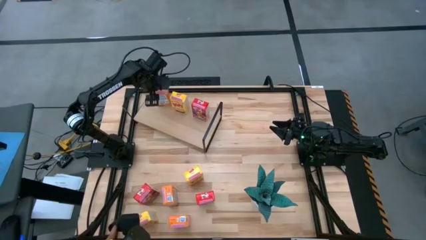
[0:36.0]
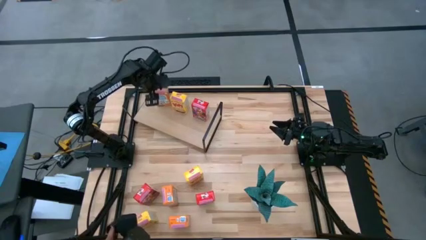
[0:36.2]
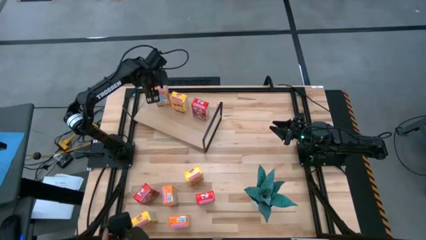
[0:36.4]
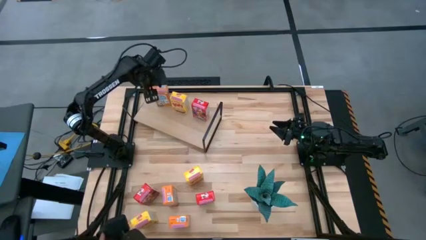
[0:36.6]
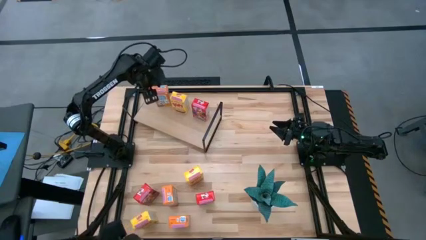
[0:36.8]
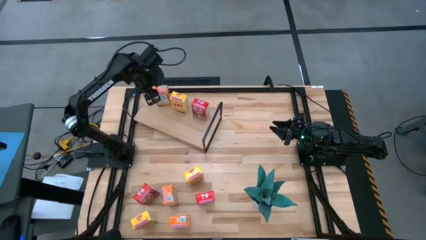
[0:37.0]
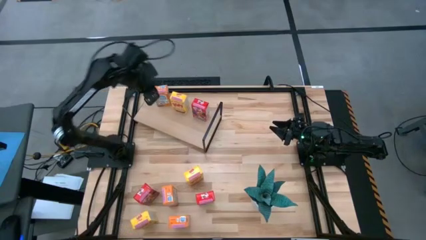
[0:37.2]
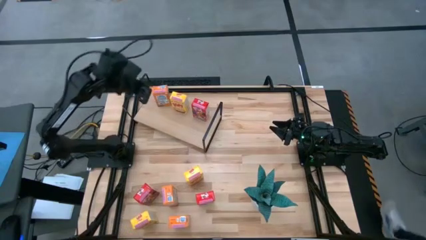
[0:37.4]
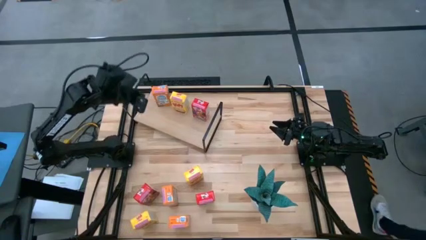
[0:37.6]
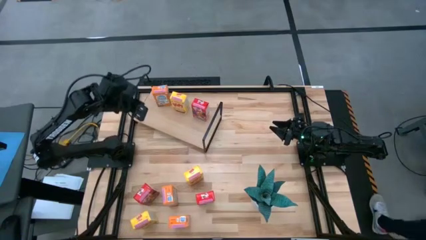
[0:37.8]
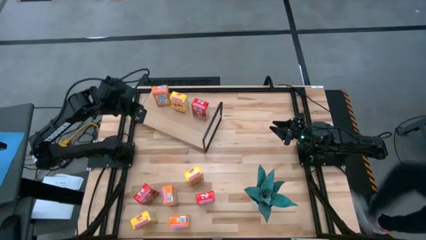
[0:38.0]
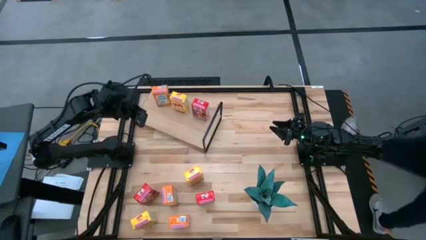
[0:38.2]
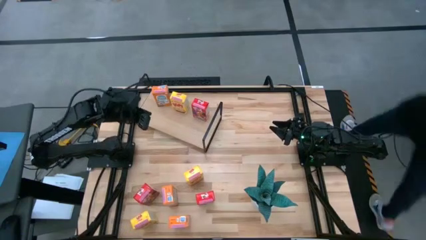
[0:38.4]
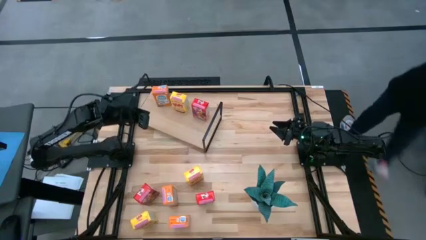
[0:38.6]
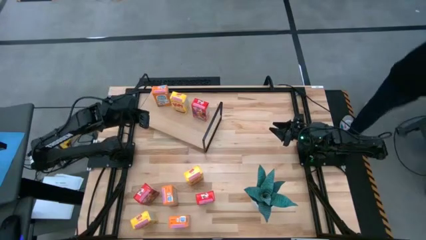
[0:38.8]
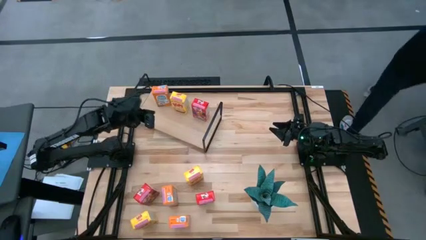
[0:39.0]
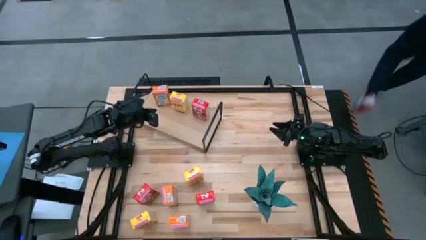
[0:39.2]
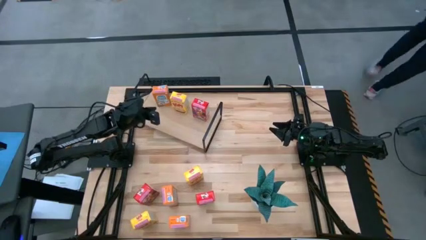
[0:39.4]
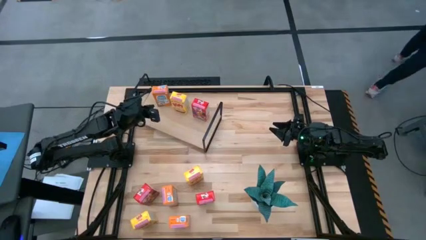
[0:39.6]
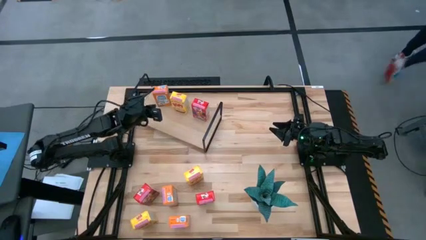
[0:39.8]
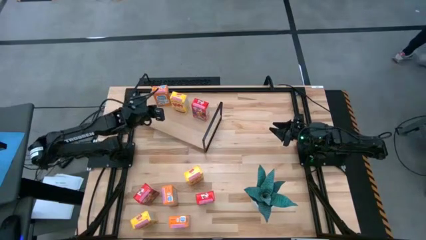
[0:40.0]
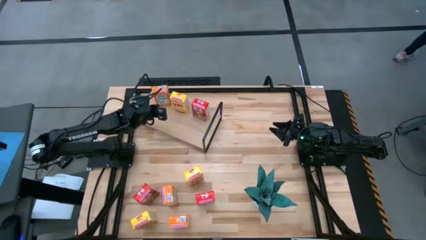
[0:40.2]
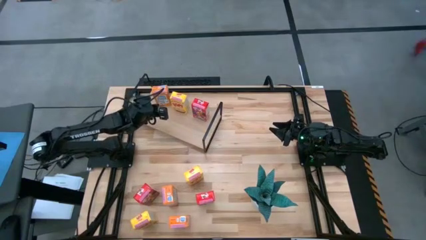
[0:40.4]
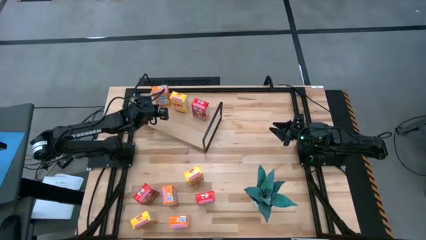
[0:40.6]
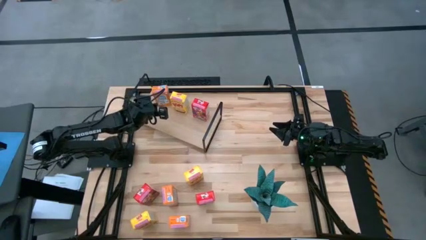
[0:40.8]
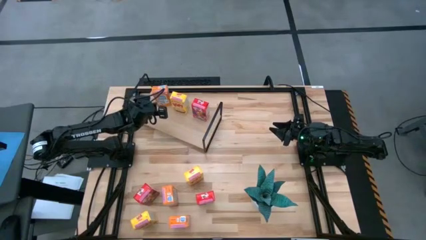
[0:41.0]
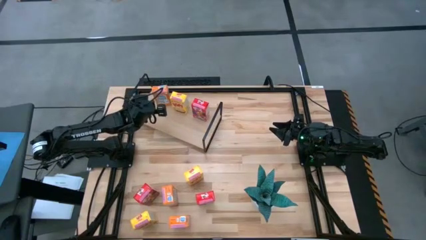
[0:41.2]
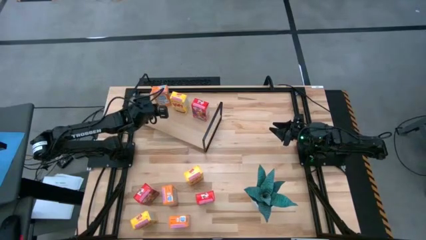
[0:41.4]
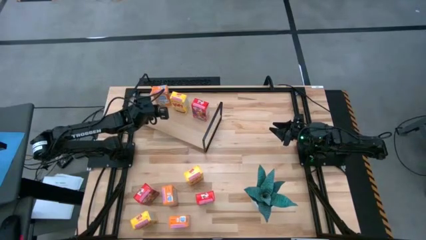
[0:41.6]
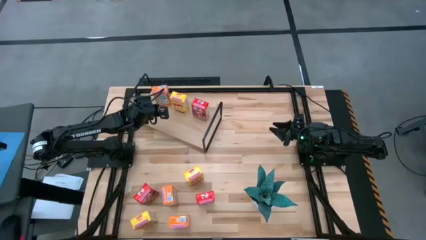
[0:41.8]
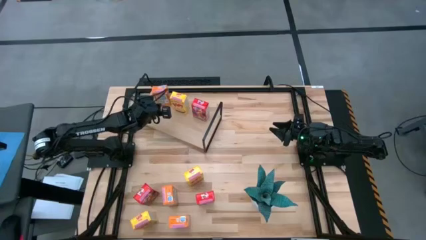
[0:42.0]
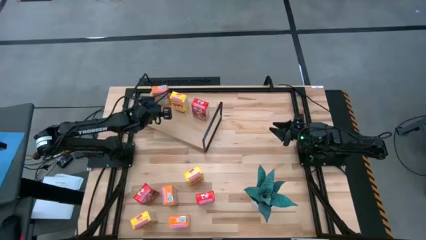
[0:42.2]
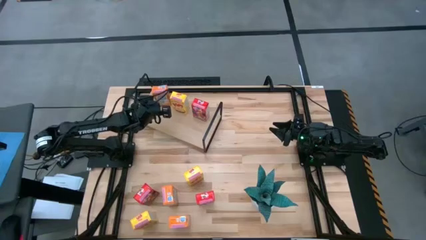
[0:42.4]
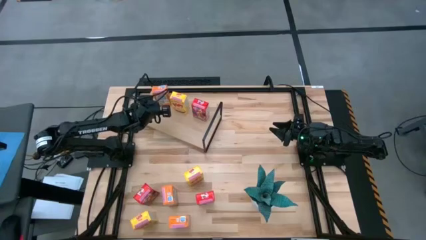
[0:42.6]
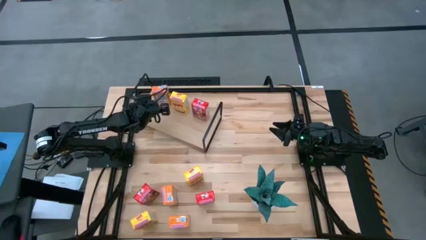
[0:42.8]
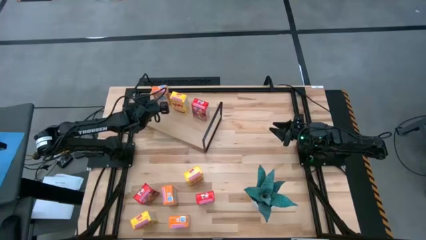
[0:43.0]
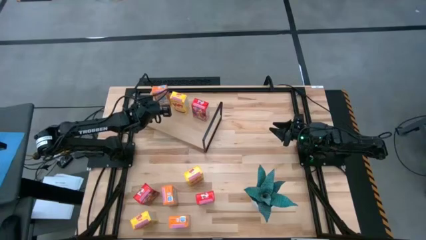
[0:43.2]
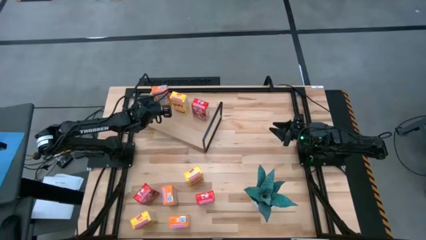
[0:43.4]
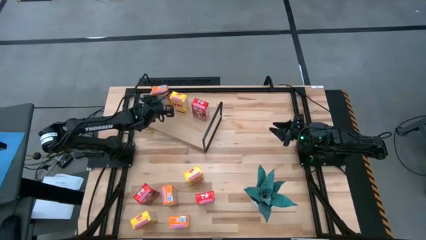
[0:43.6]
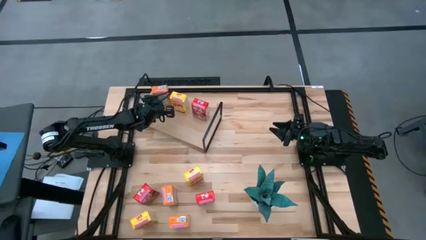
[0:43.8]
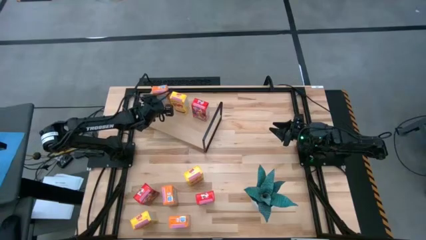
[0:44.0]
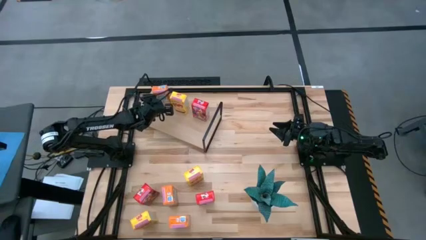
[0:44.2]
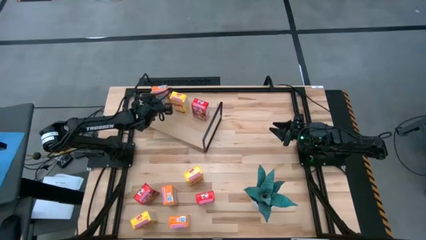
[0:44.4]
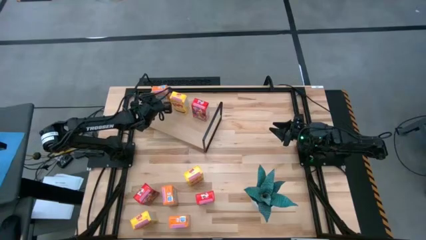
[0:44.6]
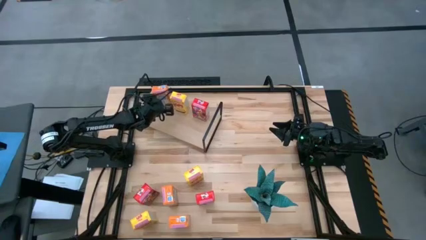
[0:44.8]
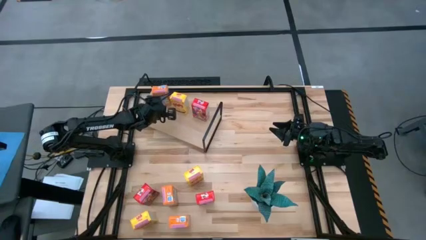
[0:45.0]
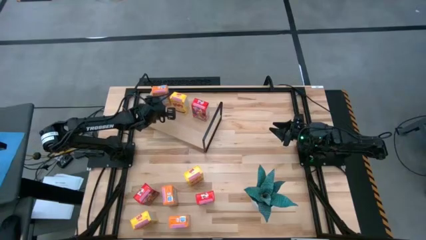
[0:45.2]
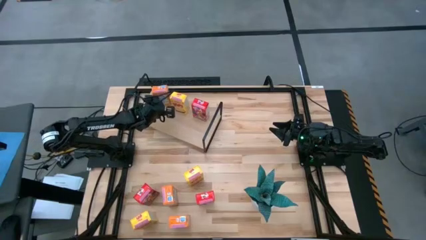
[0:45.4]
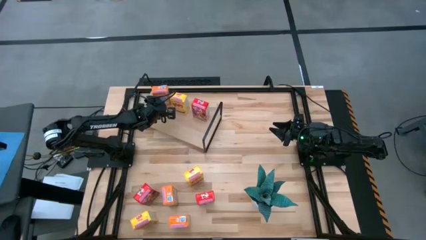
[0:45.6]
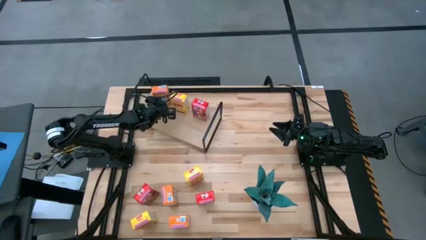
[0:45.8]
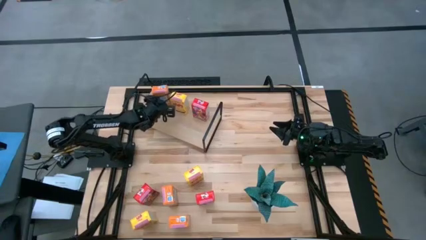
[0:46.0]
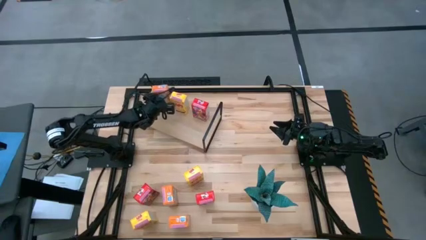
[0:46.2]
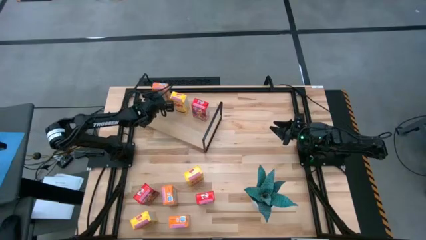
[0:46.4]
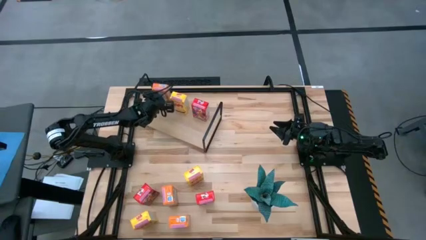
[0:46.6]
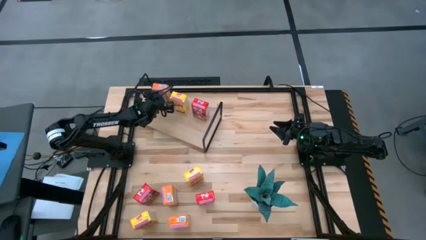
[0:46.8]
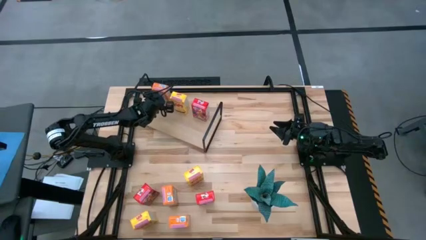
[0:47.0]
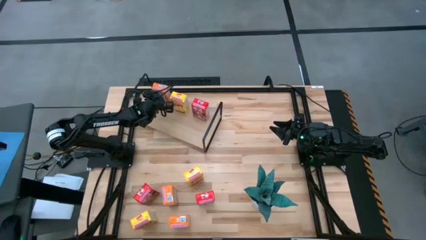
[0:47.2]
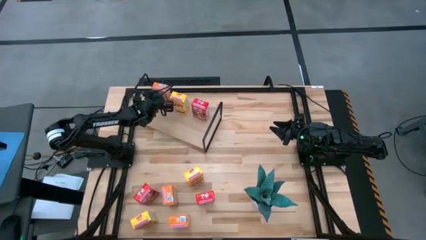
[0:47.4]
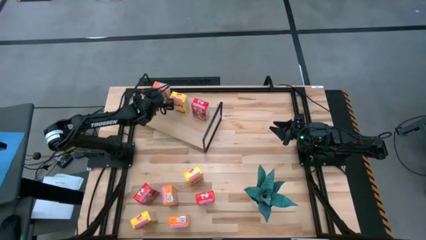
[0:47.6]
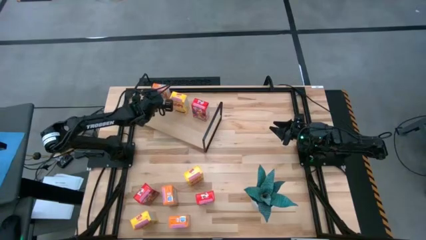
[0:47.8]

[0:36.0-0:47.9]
Task: Stack cereal on shelf
Put the top orange cereal box on the shelf

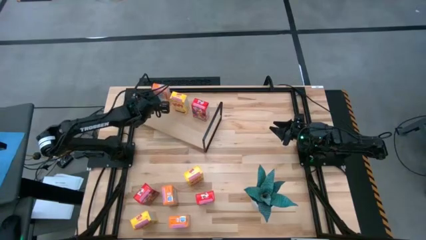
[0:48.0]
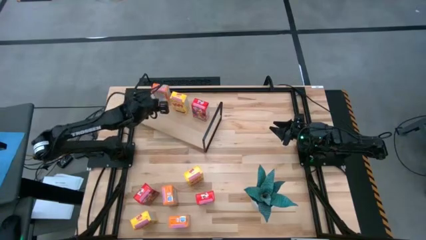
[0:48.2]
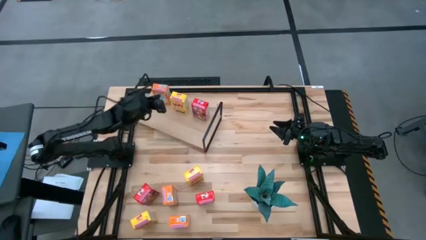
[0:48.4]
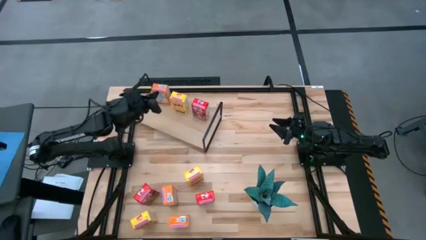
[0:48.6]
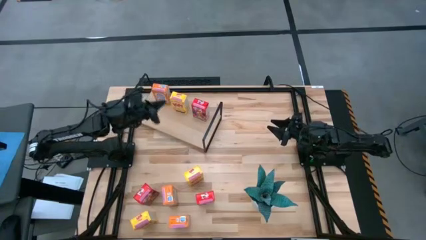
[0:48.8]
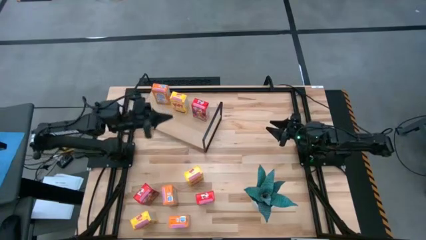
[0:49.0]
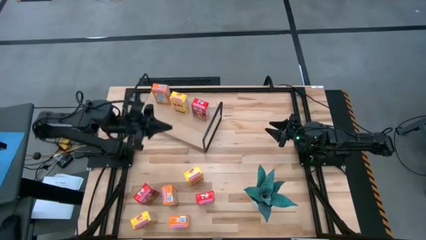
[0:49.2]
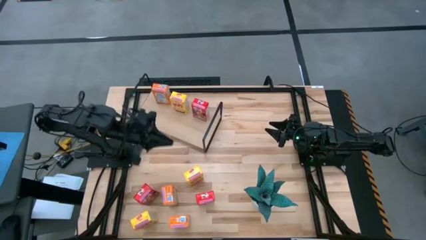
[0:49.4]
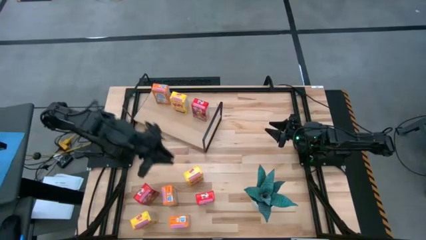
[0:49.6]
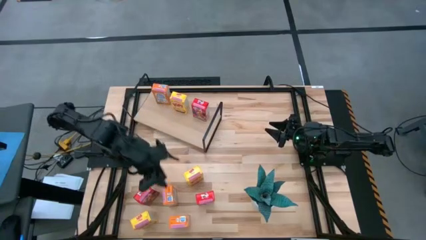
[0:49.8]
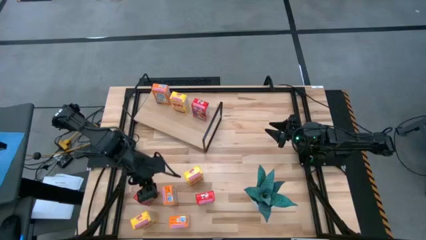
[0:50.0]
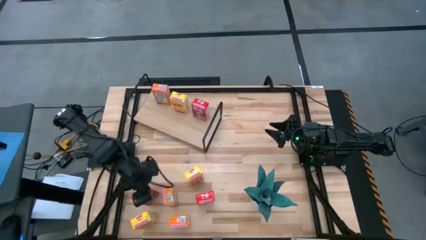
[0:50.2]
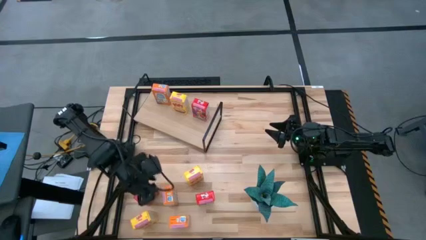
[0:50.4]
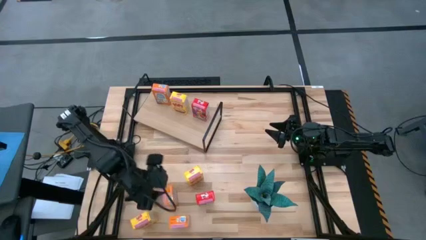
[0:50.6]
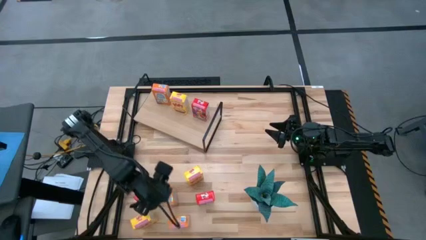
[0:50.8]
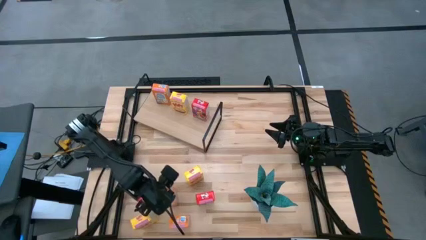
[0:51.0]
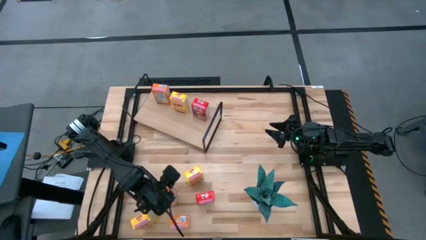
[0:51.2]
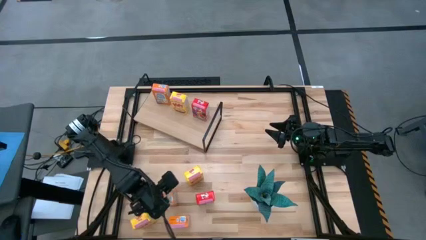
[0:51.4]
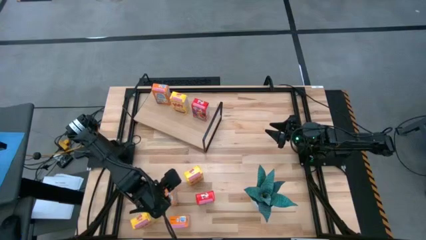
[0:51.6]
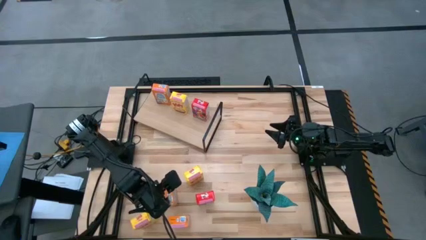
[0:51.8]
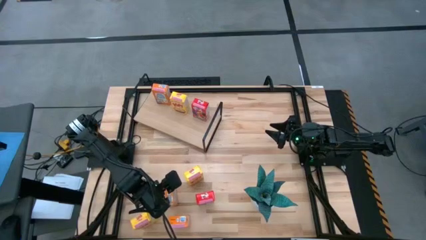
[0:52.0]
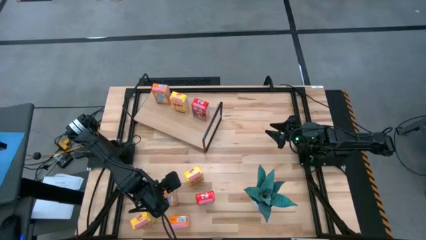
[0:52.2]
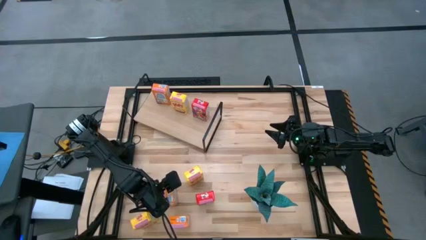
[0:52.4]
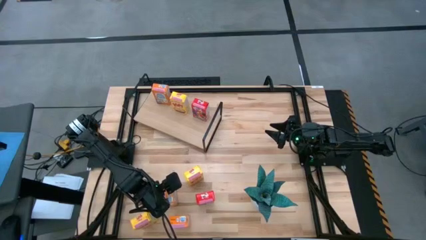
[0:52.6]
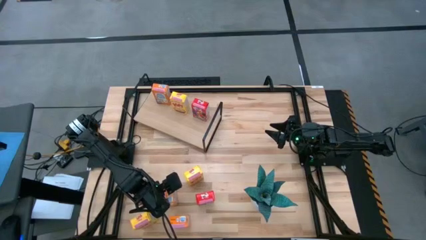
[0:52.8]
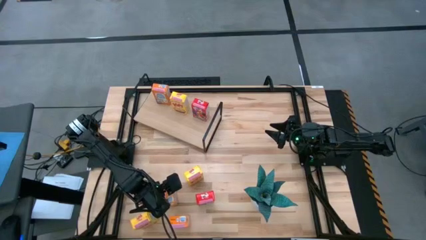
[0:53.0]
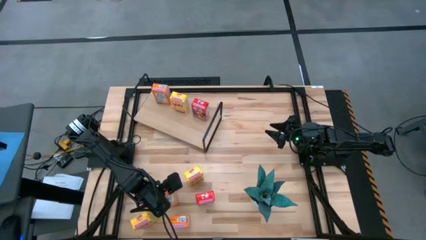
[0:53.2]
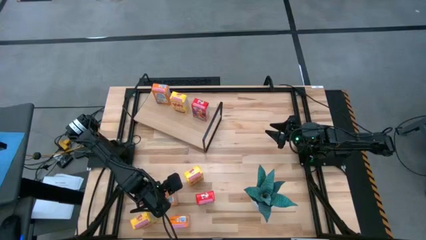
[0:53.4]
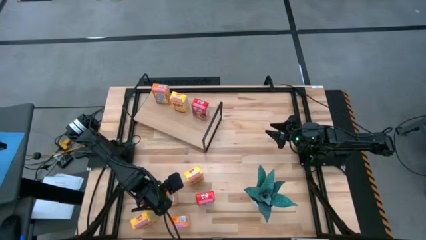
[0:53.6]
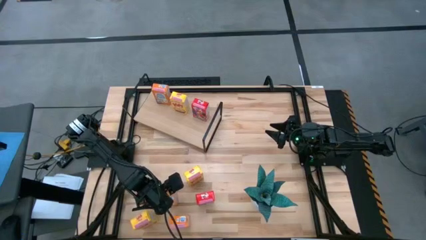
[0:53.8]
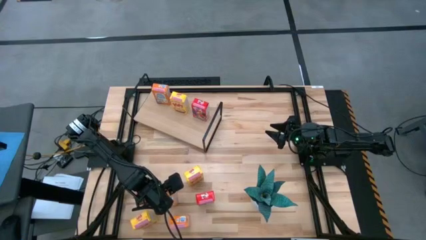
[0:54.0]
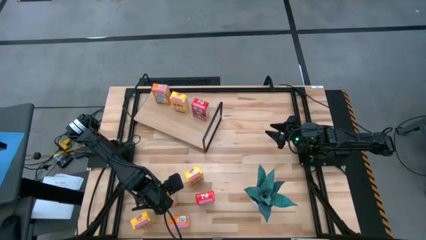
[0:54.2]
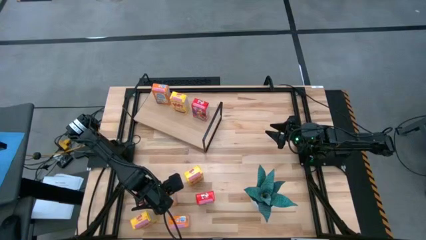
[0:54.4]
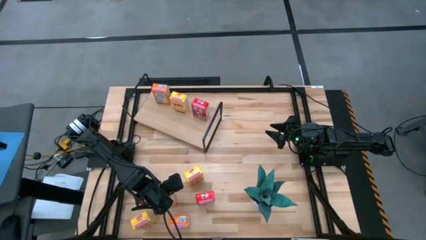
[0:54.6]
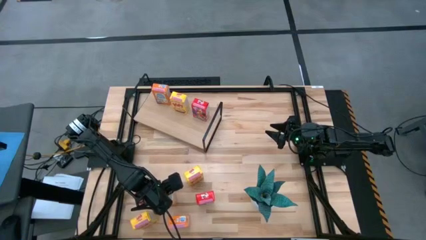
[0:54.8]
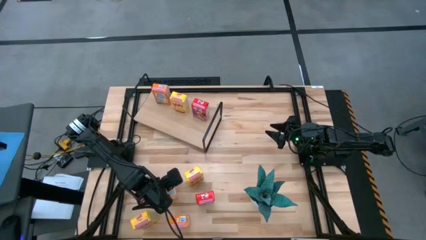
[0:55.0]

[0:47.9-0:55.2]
Put the top orange cereal box aligned with the other orange cereal box on the shelf
